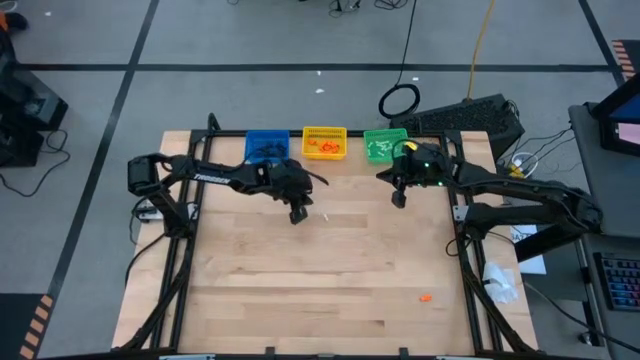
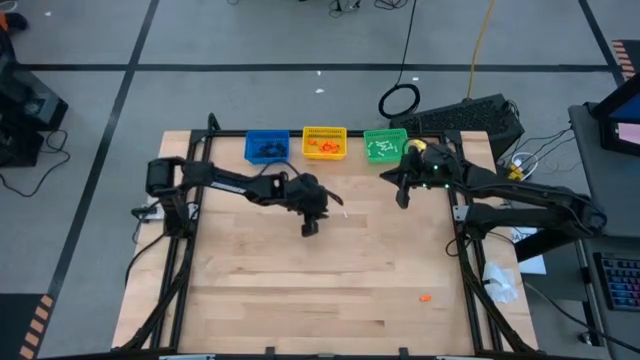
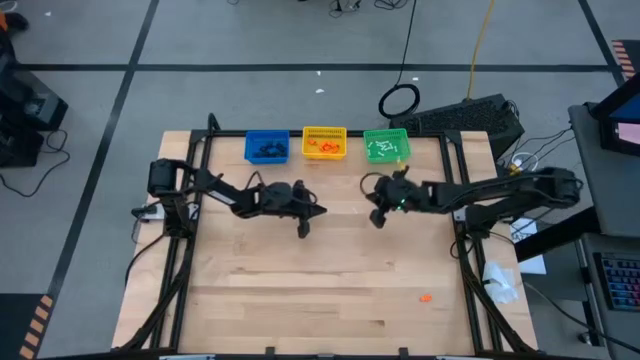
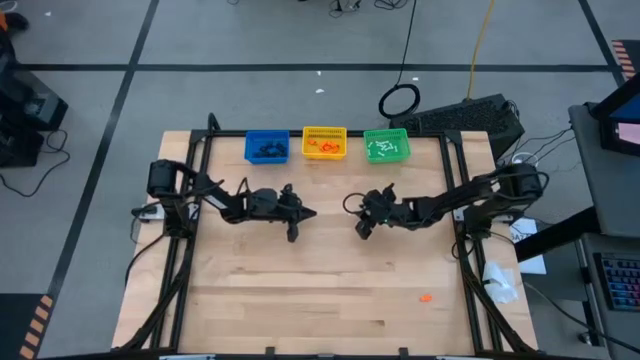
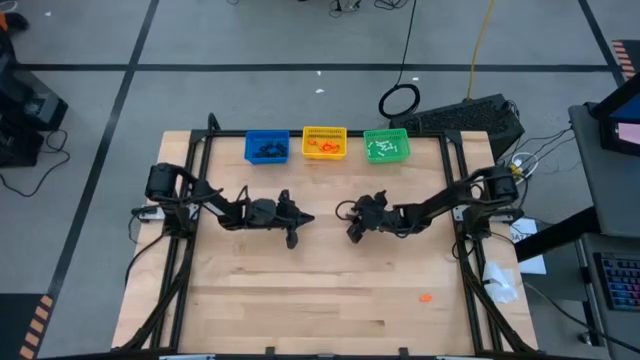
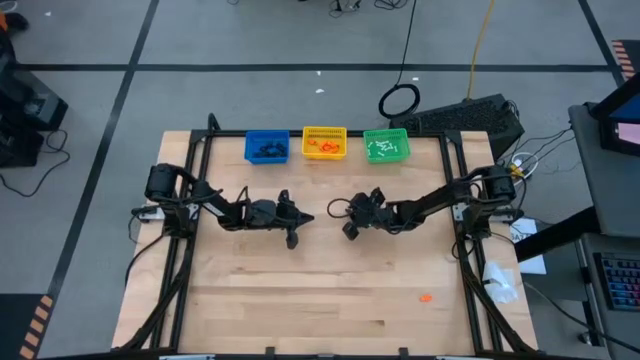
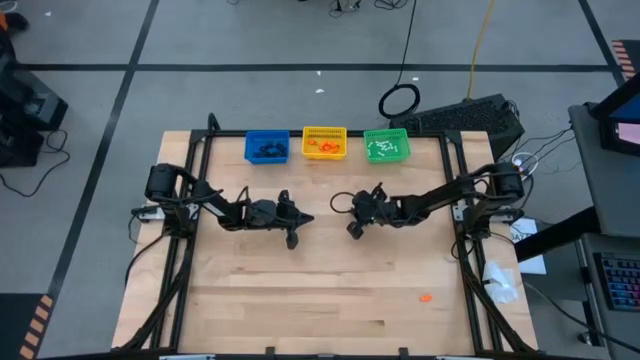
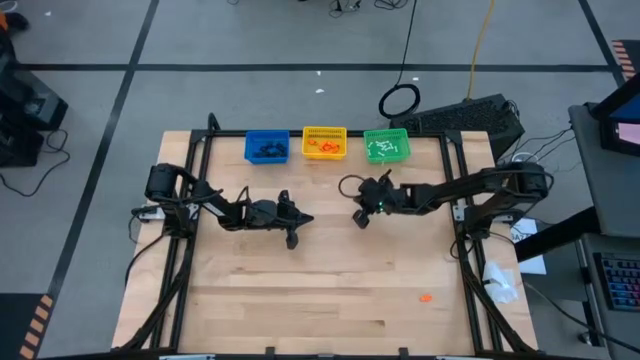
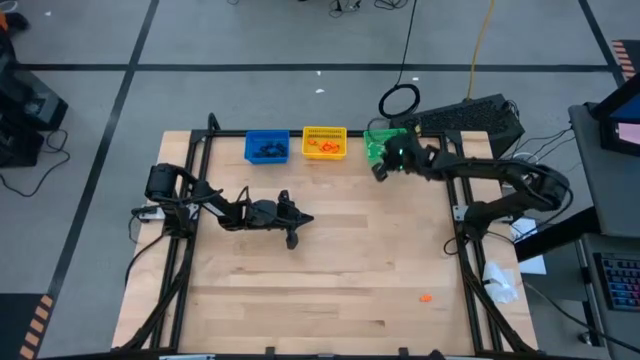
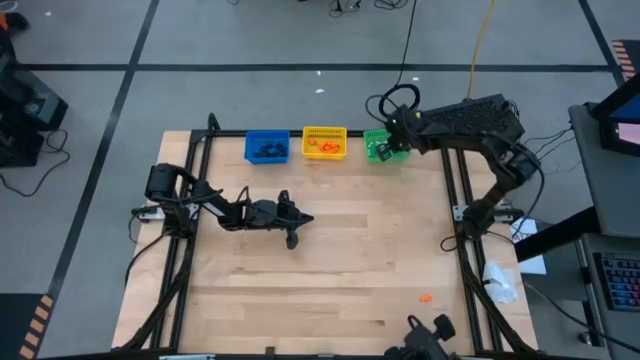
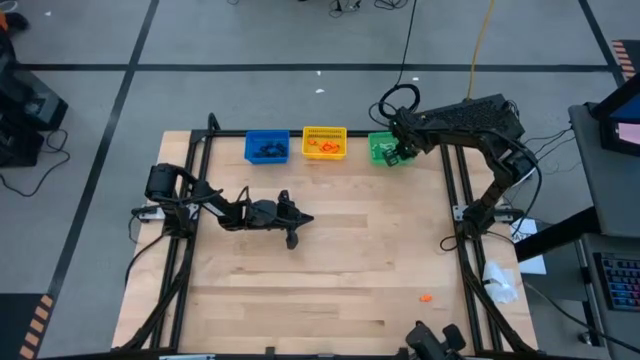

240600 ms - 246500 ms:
Task: Sort Halloween decoration
Put the white bone toy into the green bin

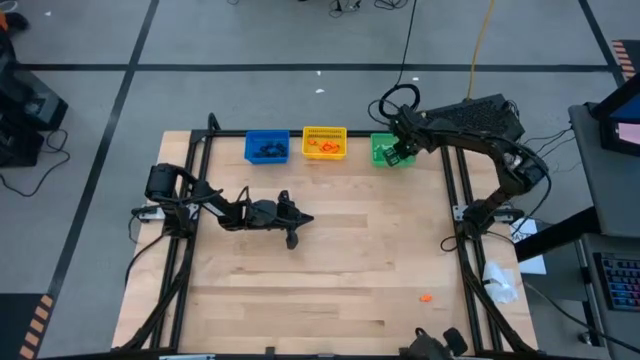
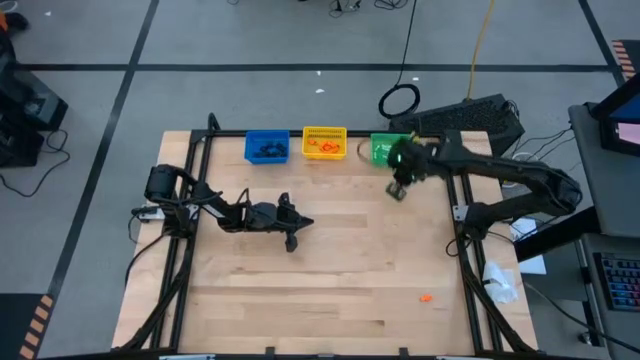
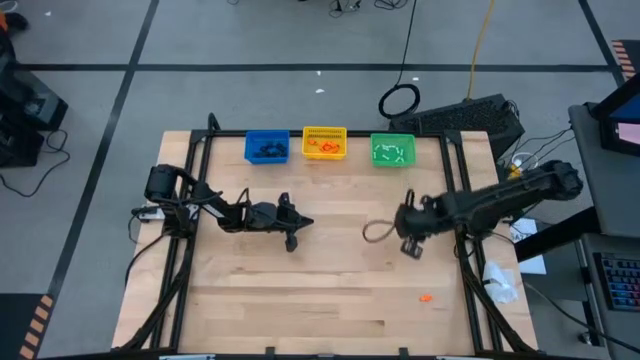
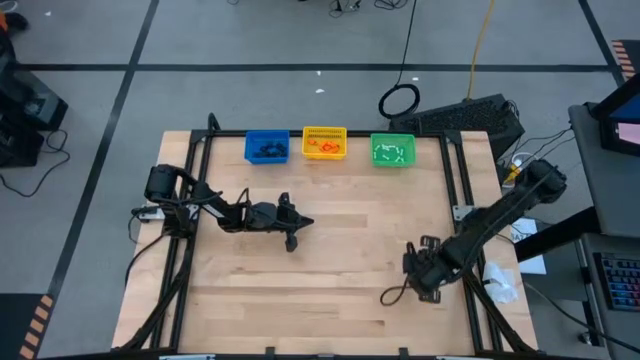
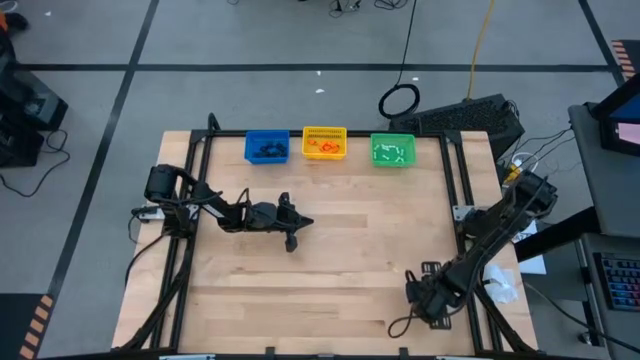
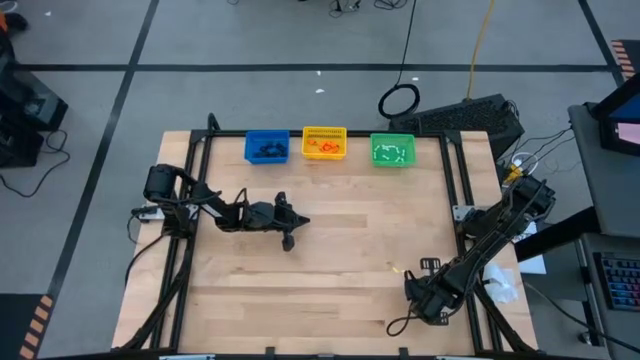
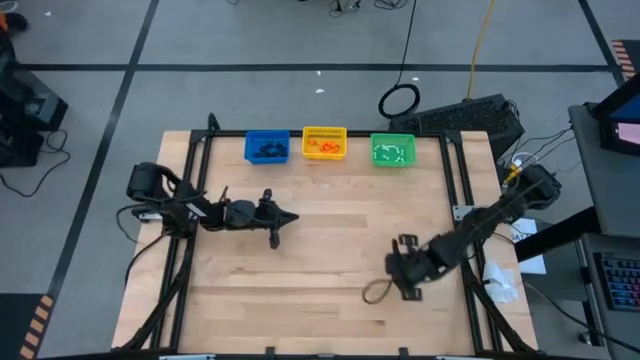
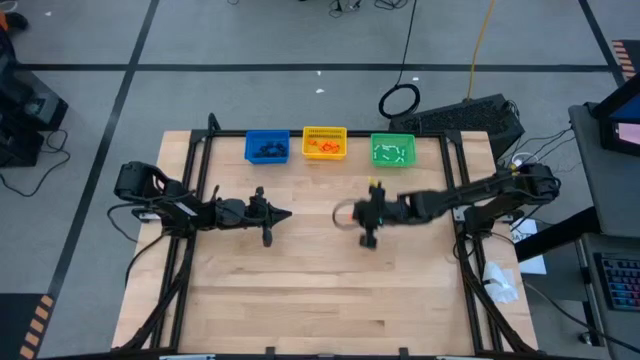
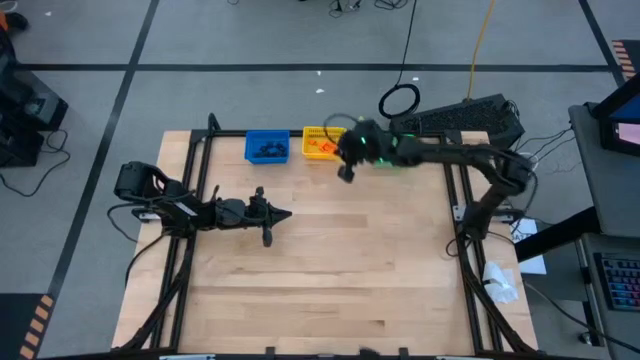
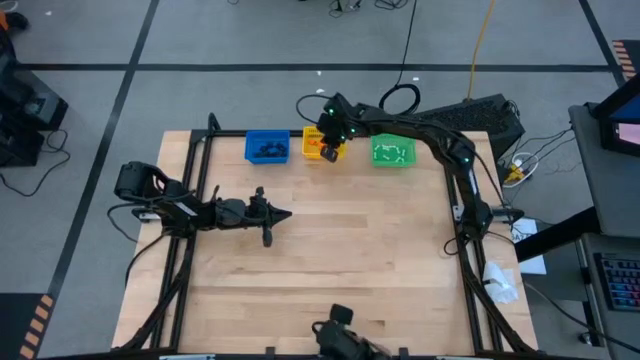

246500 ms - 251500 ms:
Put the orange skeleton toy into the yellow bin

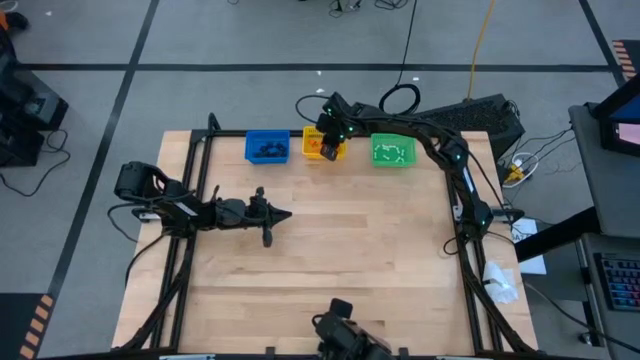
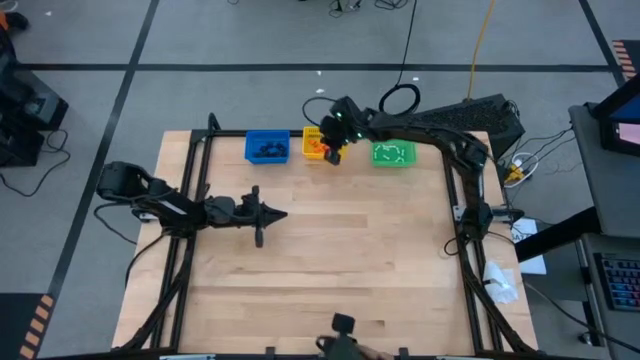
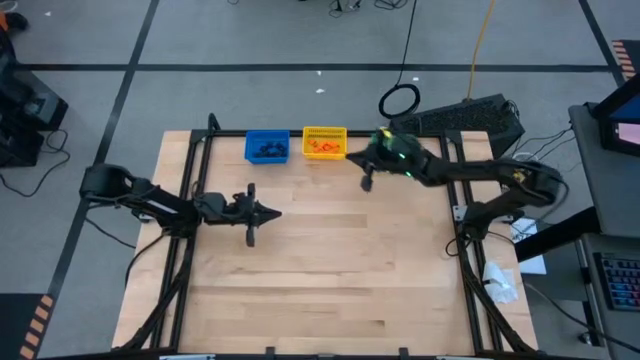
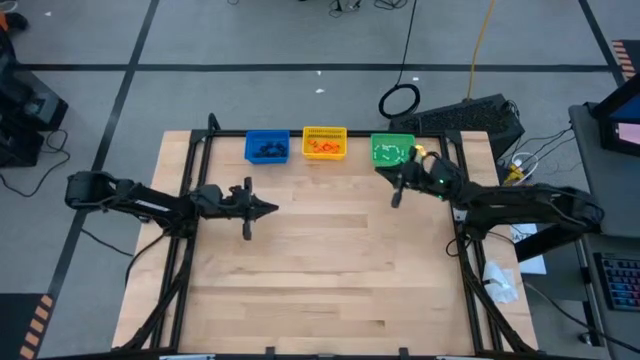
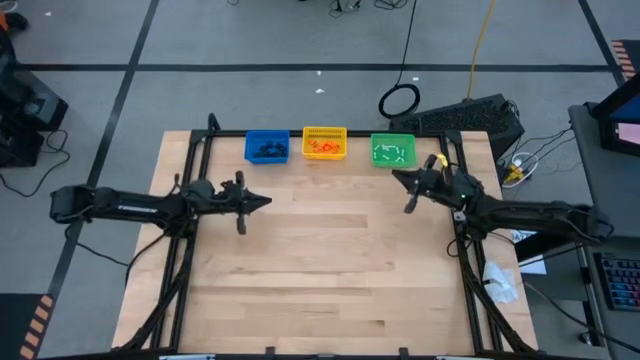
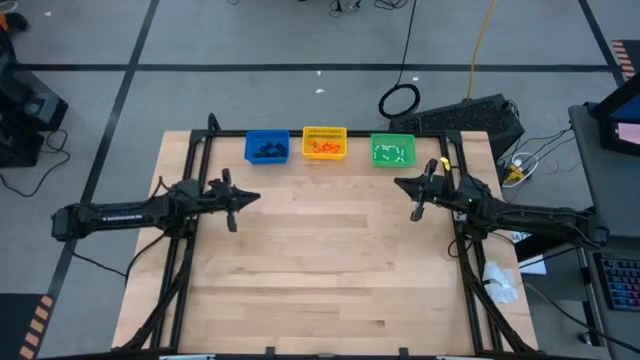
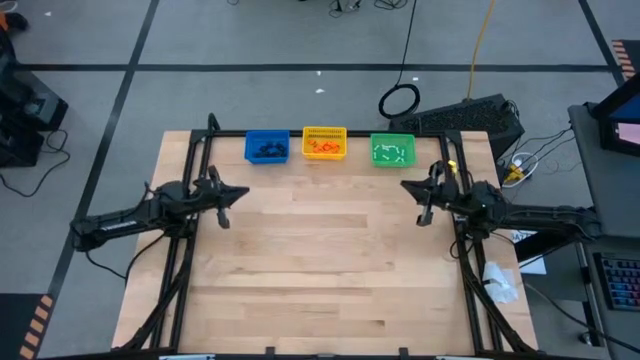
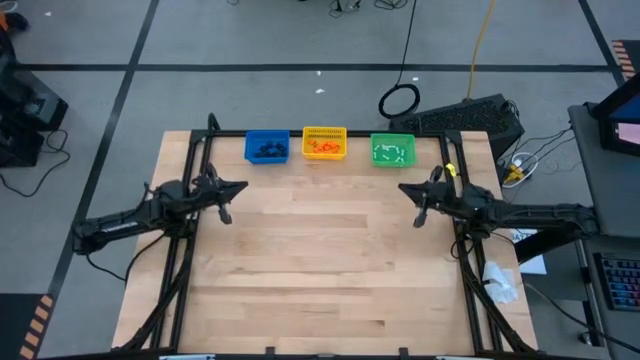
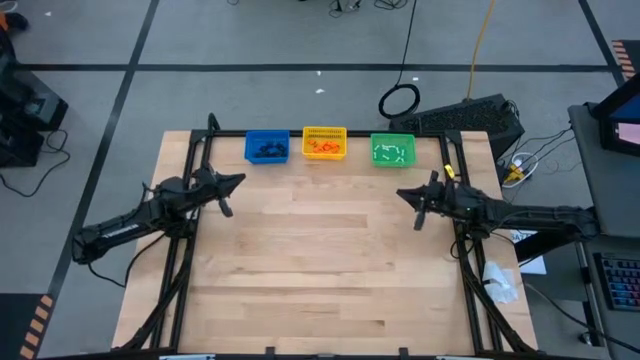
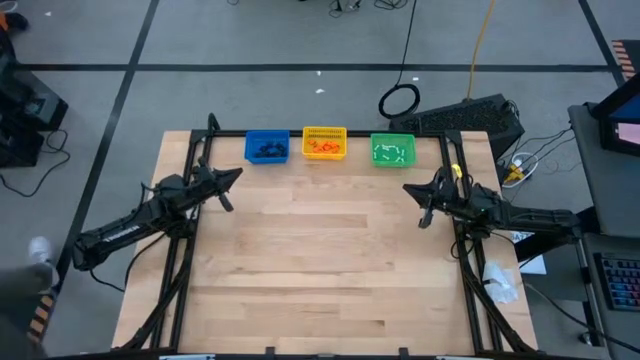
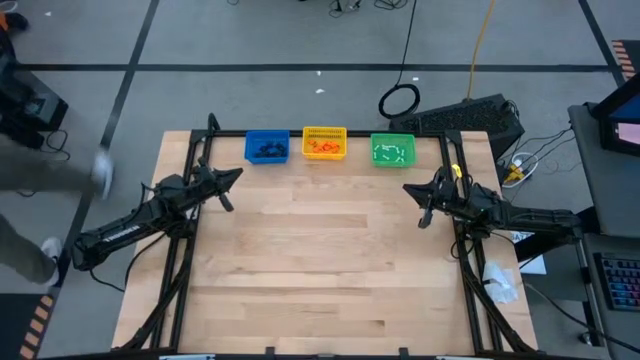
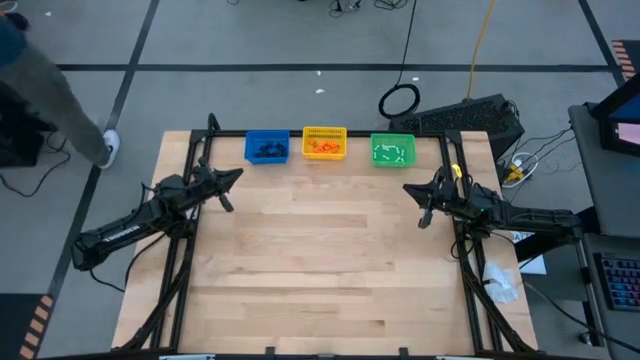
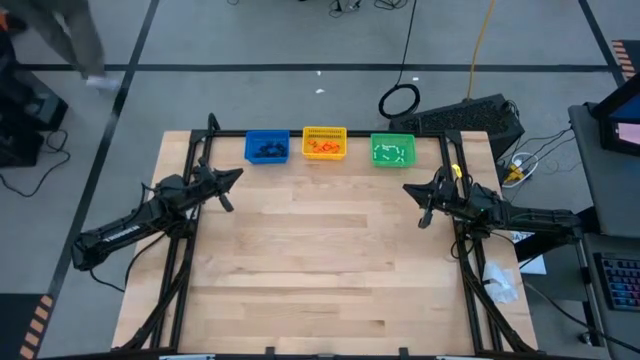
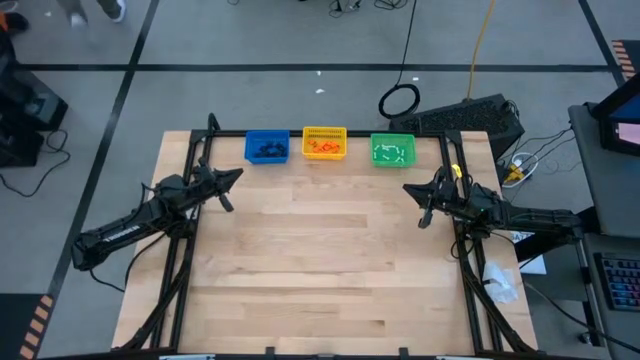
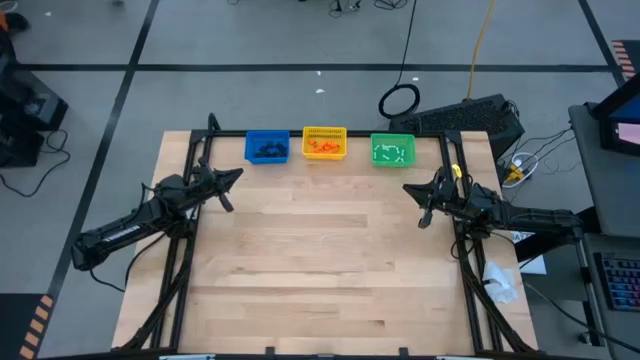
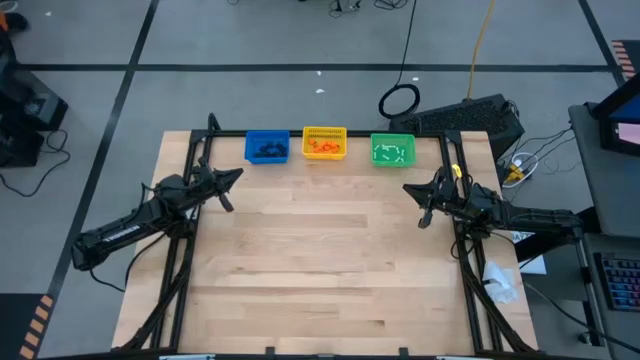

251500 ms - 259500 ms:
Return to Home Position

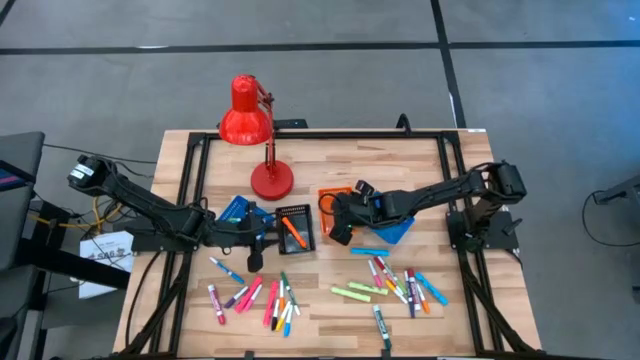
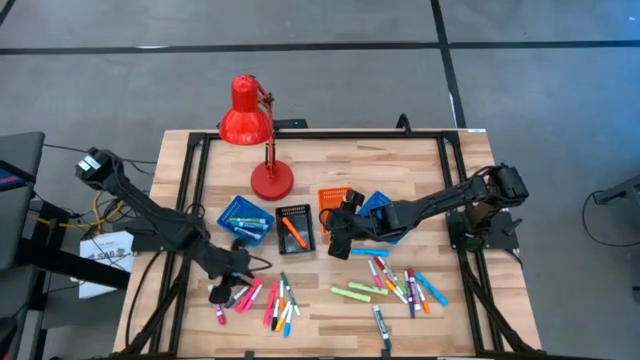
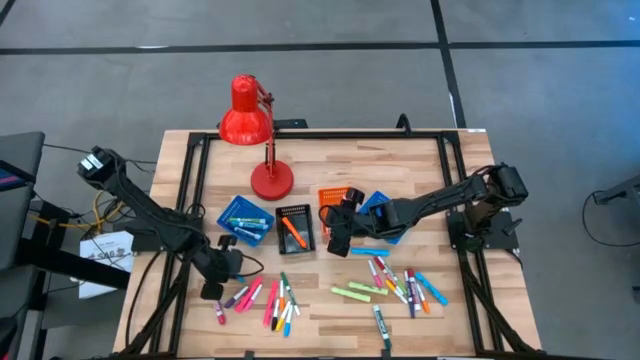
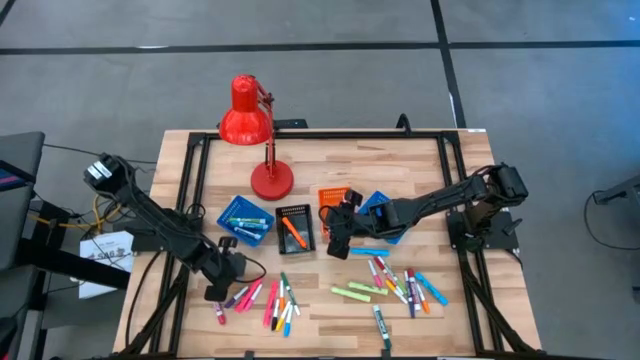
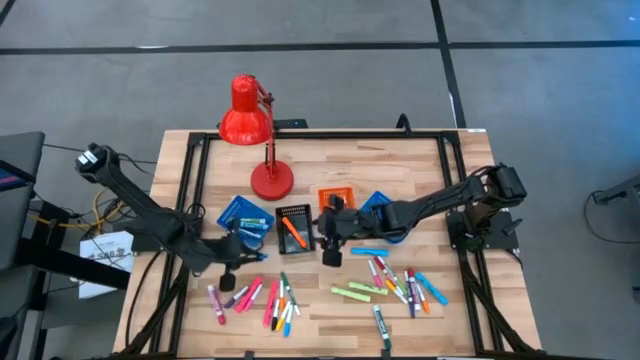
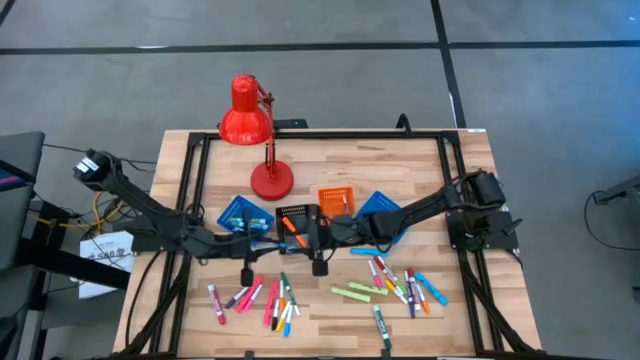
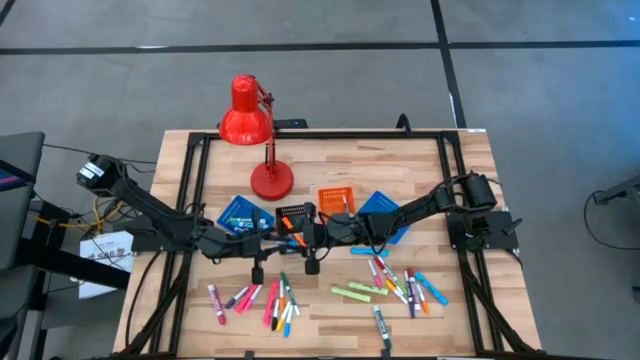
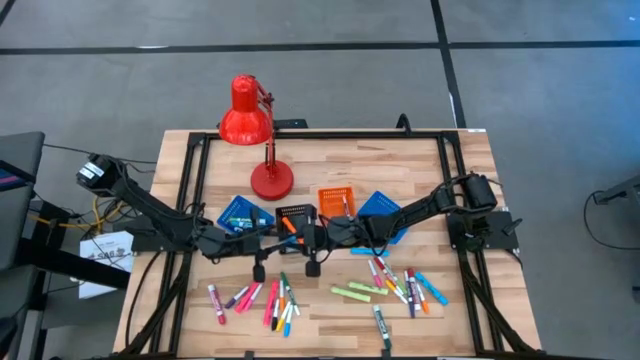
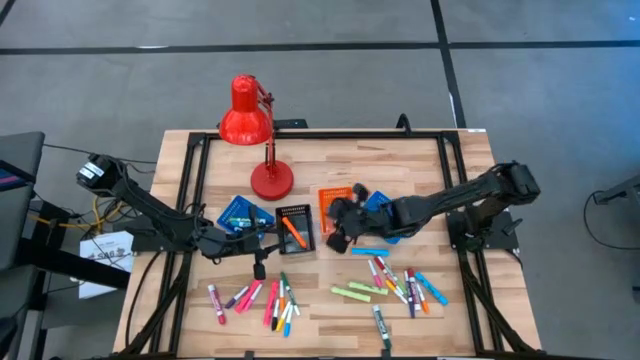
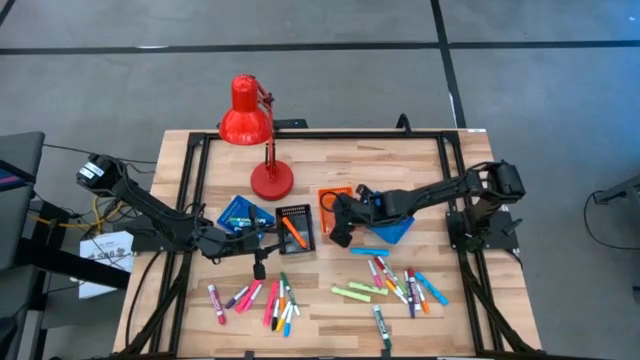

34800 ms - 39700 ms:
Task: Pick & Place Markers
Put the small light blue marker pen into the orange basket
